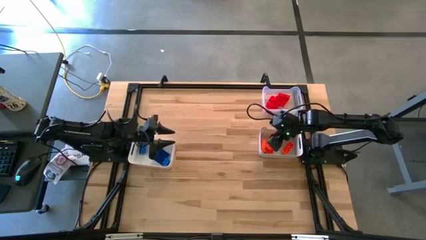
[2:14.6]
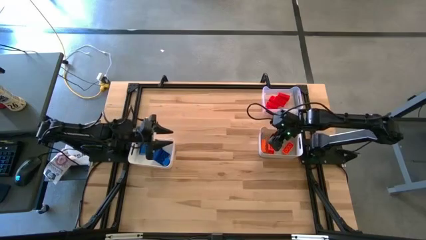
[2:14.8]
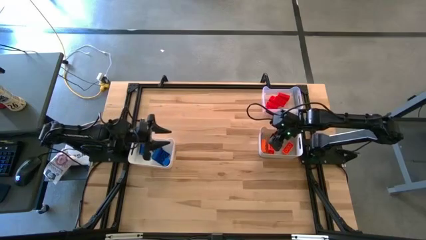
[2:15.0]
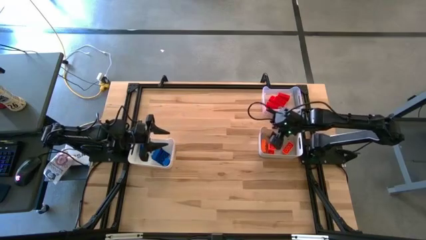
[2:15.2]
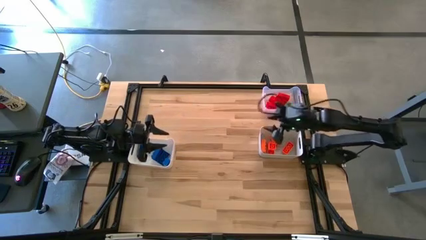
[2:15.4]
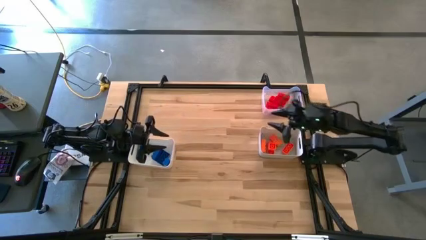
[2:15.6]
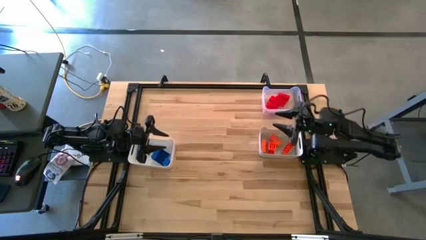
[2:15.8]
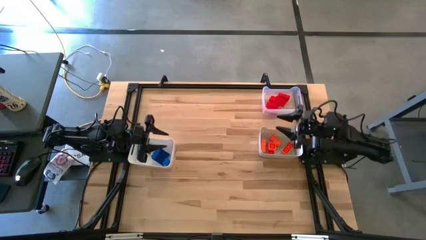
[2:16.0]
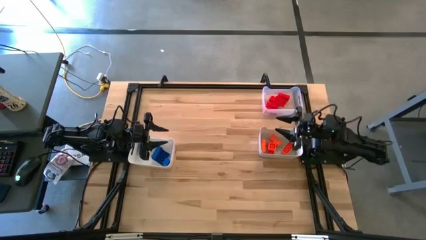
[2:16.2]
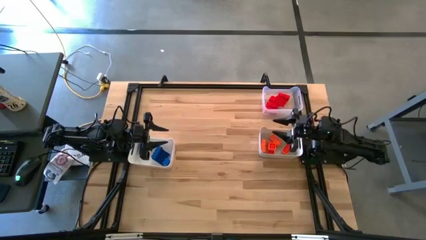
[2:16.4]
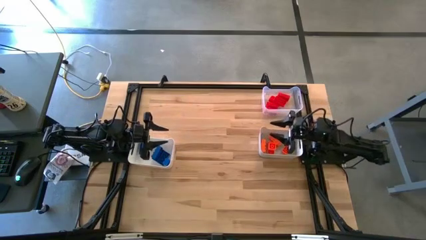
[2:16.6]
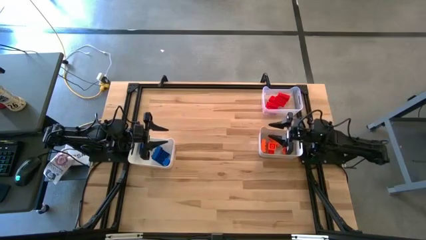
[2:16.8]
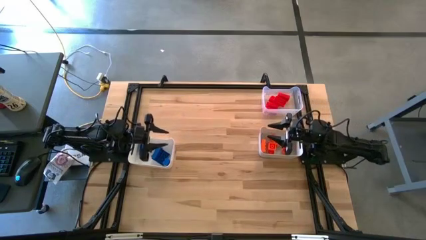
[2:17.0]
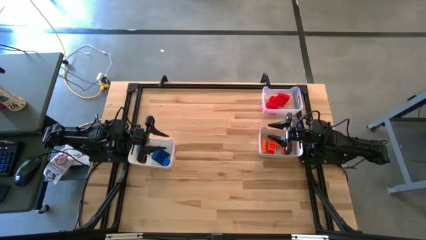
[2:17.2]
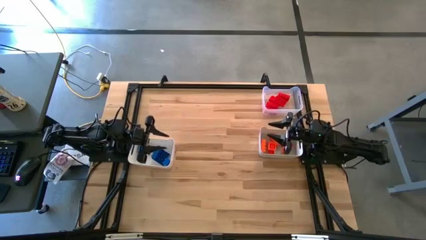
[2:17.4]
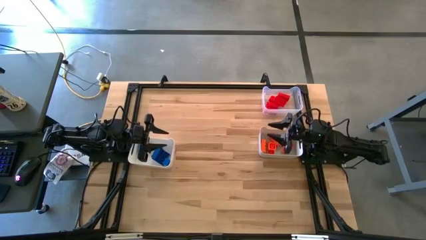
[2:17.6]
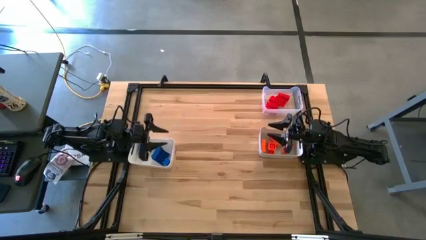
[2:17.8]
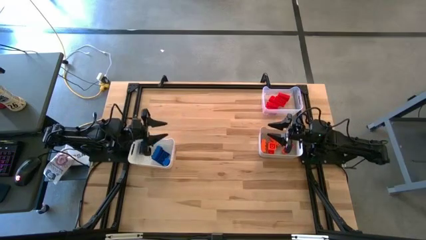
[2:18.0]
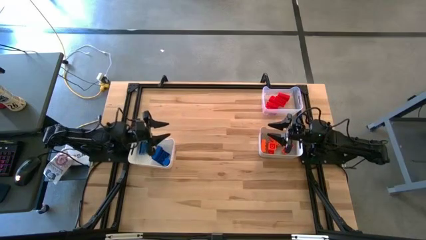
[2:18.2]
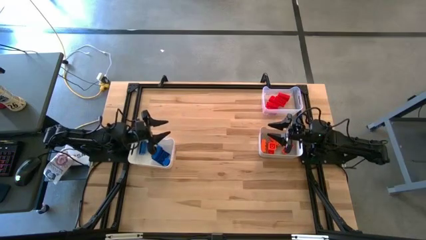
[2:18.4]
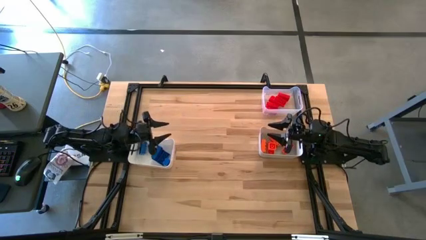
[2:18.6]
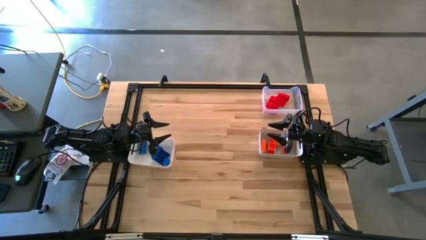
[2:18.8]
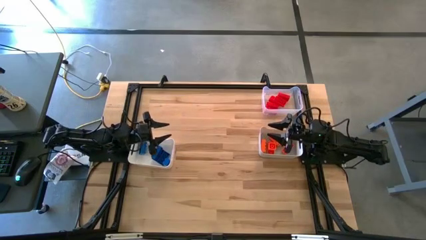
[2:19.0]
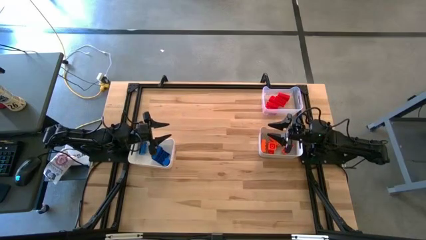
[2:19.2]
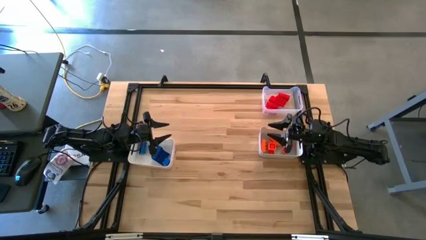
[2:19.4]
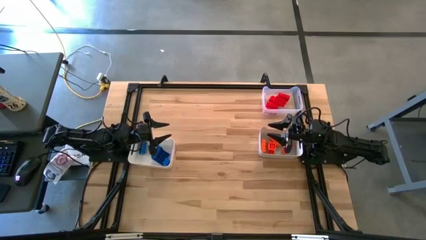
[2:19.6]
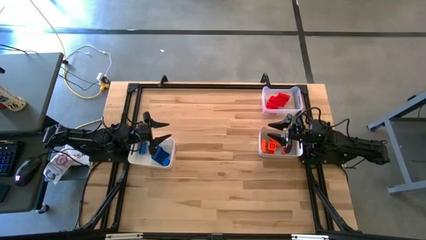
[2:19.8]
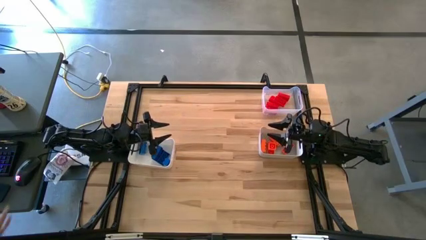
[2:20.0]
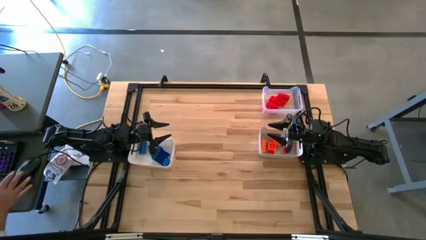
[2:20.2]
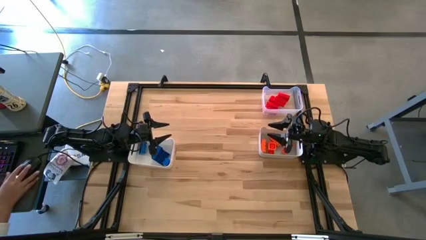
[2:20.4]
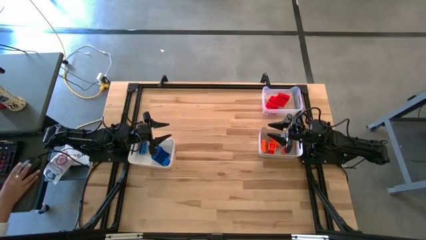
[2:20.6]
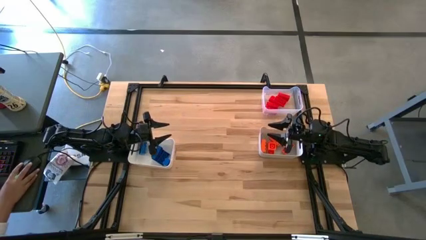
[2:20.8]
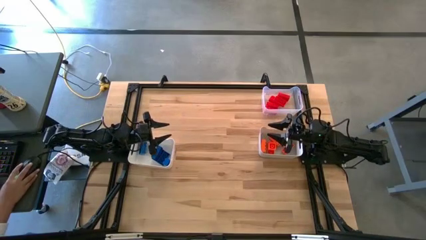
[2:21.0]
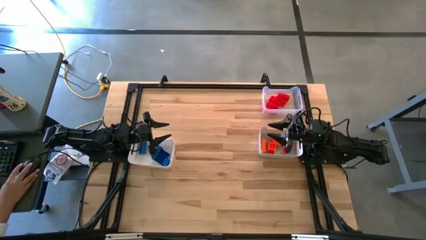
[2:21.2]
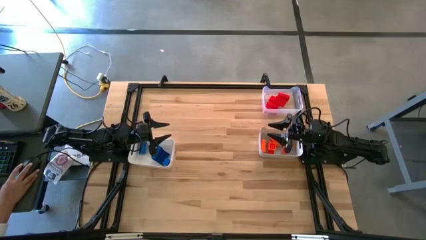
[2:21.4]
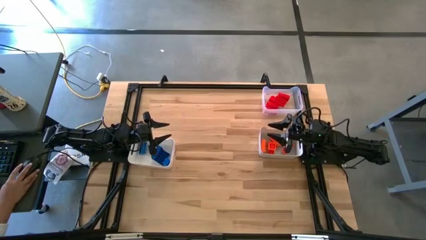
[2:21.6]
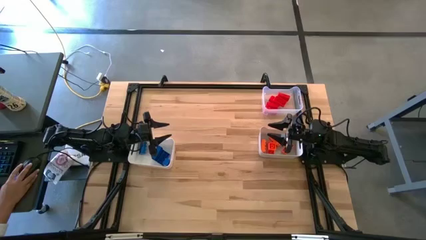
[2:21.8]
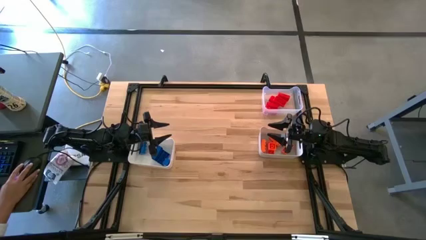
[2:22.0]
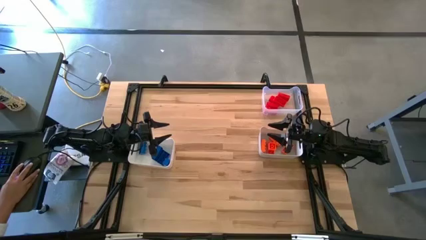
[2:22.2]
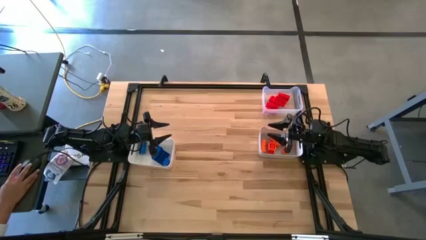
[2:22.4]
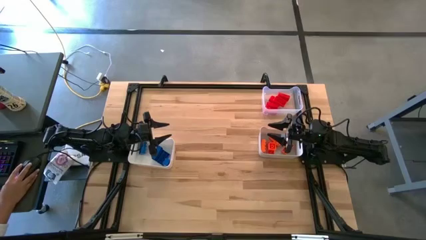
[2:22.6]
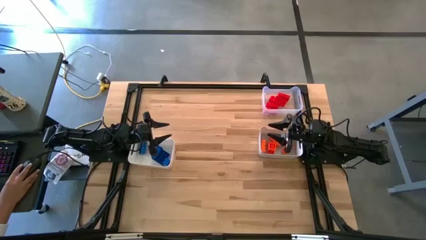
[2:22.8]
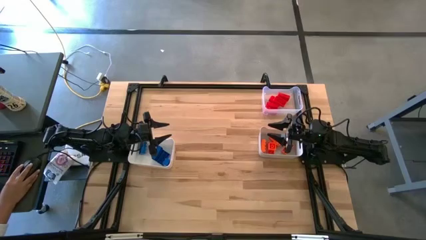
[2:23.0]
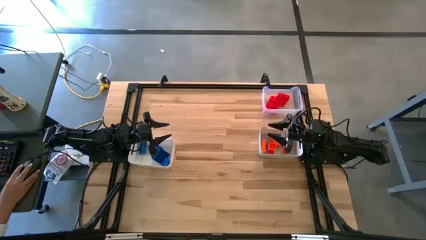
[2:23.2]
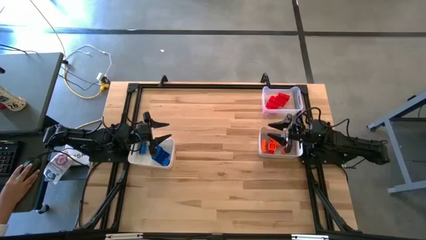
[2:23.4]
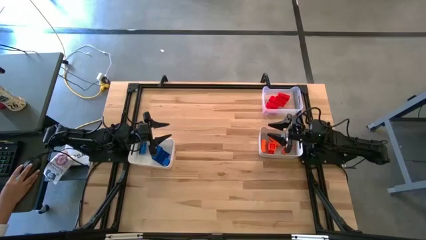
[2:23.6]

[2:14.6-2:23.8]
Task: Sort & place blocks by color
Return to Home Position

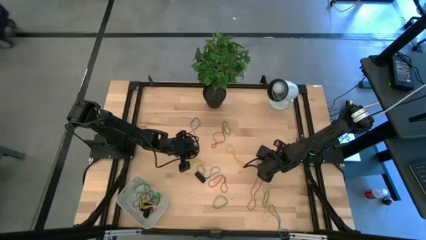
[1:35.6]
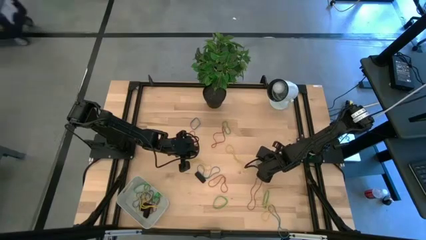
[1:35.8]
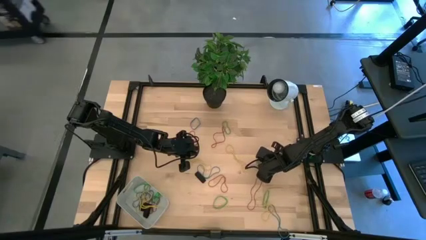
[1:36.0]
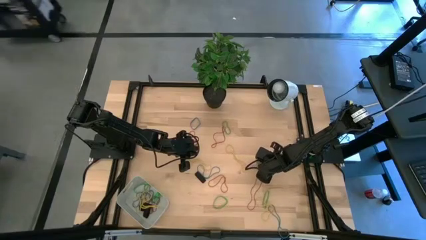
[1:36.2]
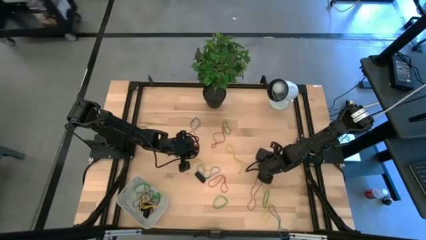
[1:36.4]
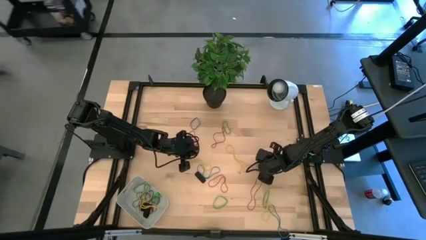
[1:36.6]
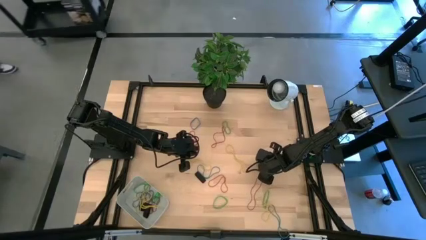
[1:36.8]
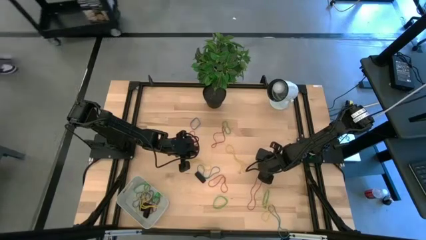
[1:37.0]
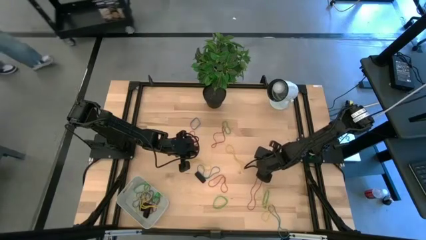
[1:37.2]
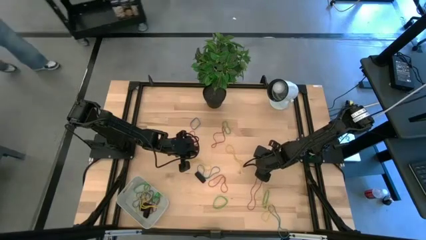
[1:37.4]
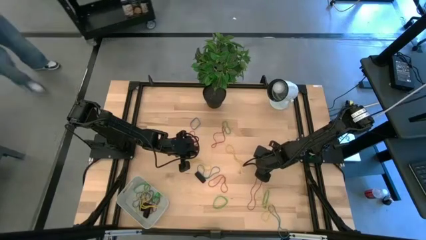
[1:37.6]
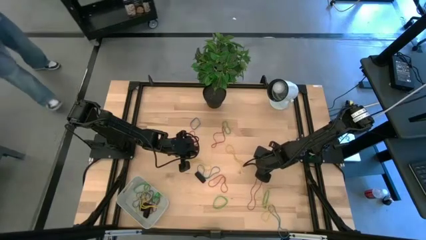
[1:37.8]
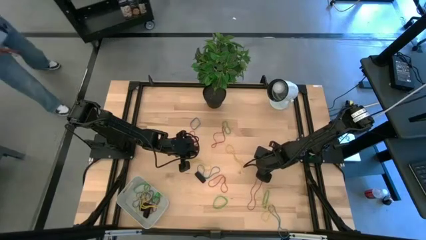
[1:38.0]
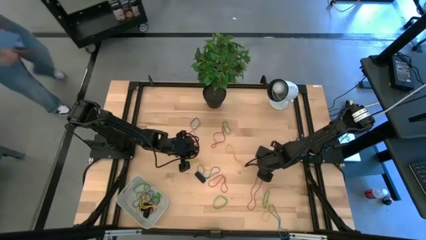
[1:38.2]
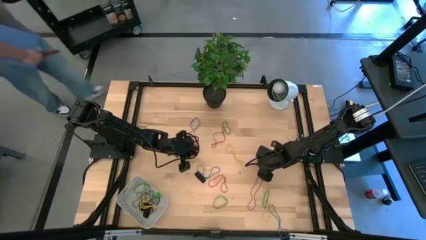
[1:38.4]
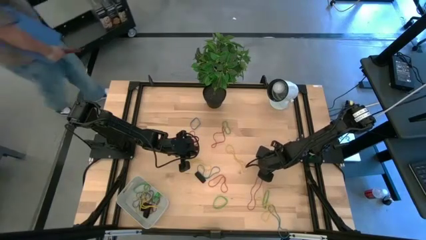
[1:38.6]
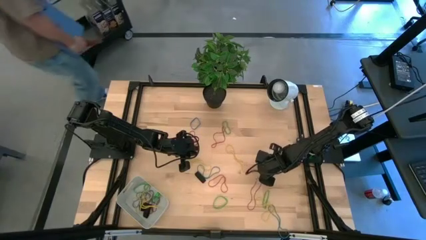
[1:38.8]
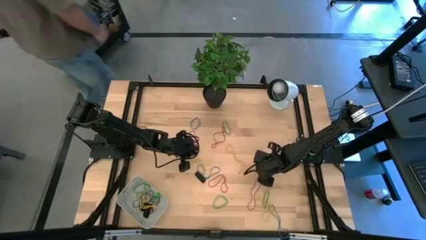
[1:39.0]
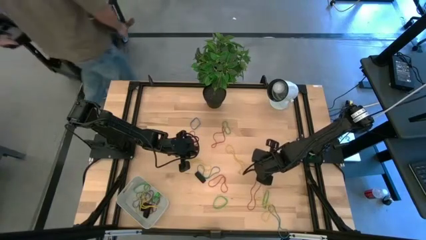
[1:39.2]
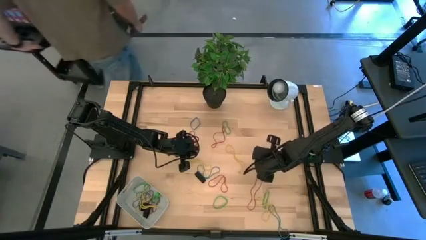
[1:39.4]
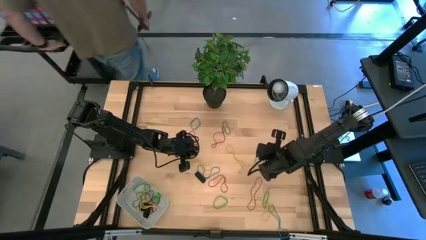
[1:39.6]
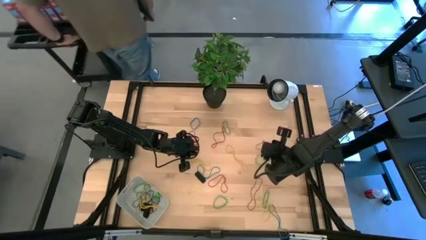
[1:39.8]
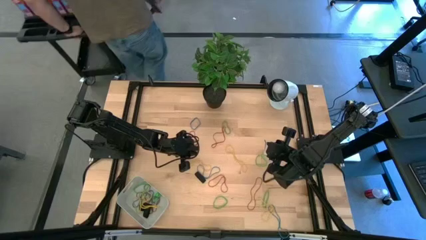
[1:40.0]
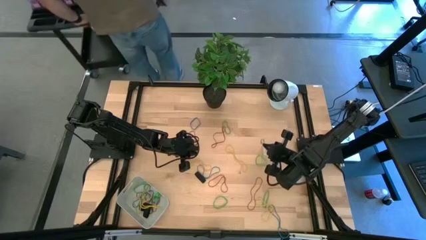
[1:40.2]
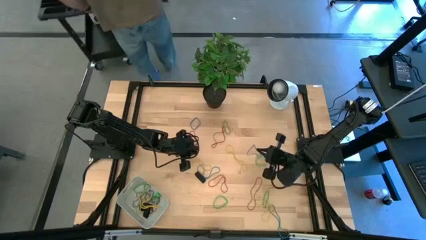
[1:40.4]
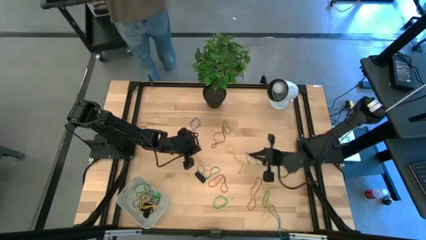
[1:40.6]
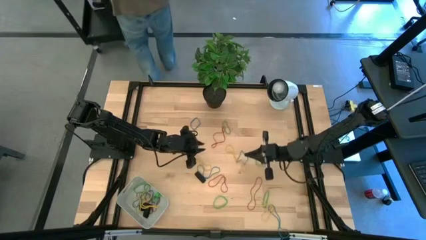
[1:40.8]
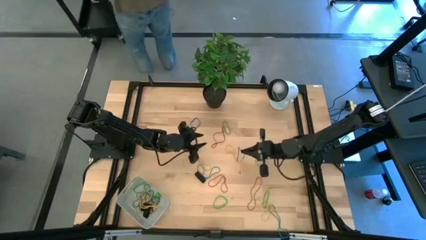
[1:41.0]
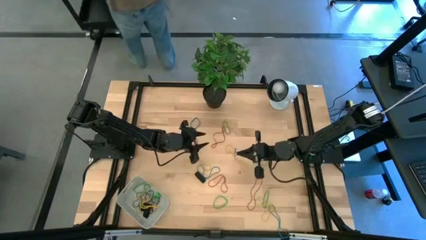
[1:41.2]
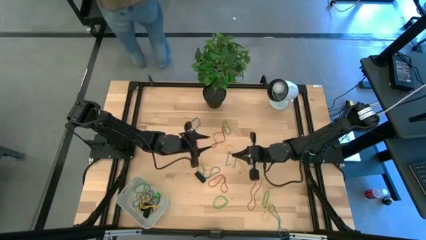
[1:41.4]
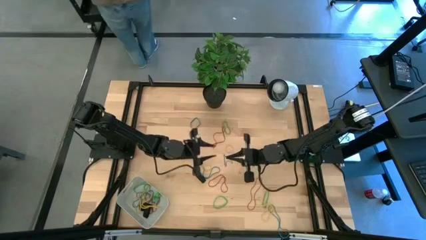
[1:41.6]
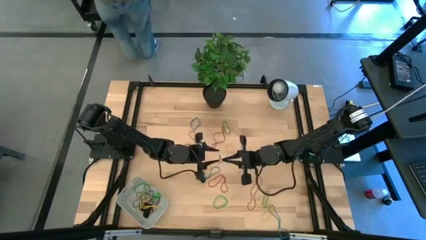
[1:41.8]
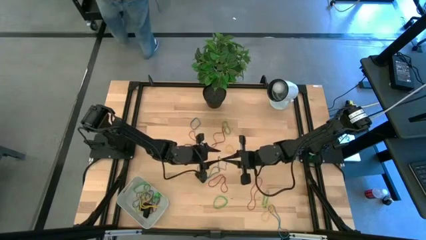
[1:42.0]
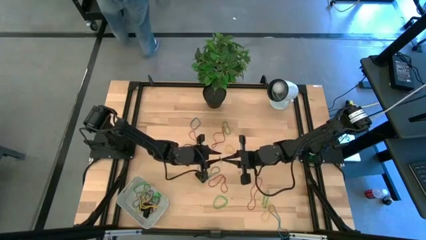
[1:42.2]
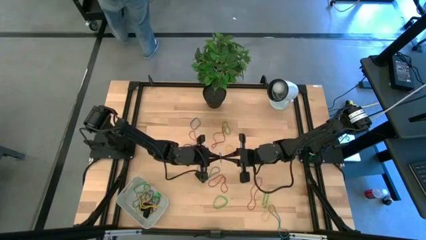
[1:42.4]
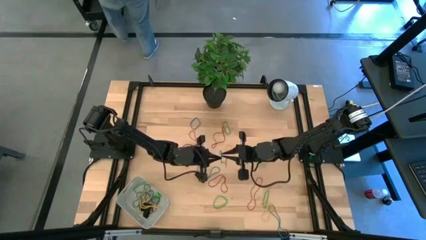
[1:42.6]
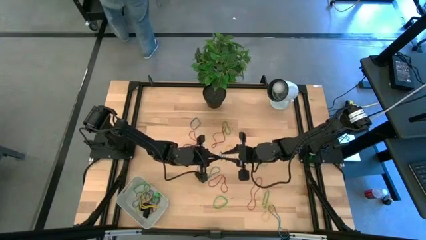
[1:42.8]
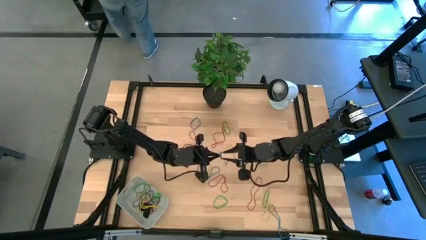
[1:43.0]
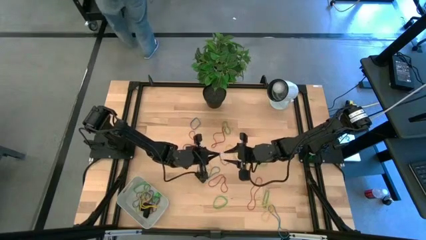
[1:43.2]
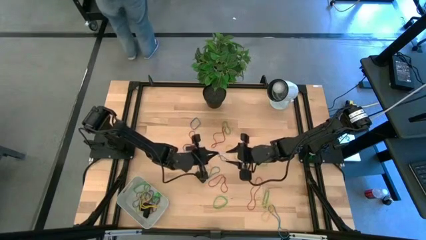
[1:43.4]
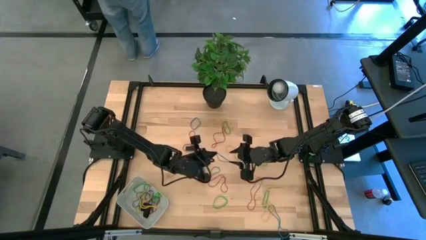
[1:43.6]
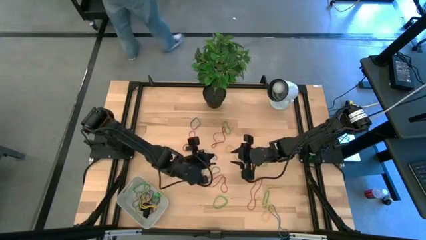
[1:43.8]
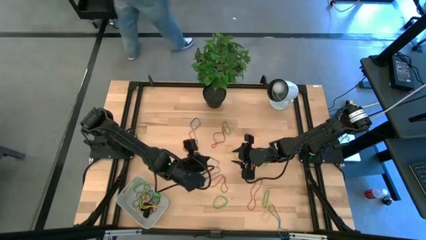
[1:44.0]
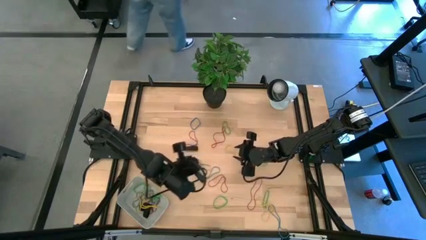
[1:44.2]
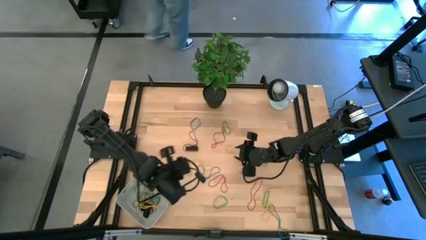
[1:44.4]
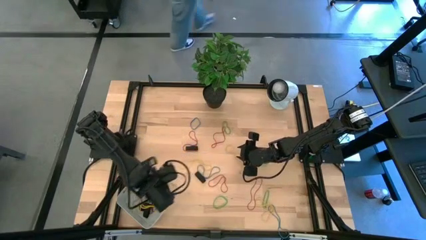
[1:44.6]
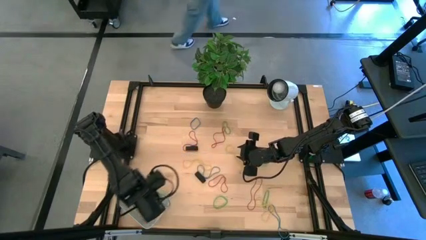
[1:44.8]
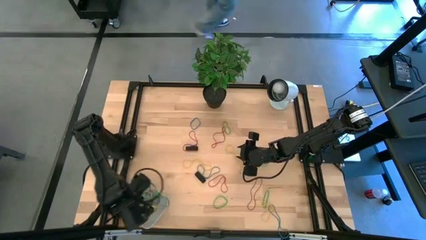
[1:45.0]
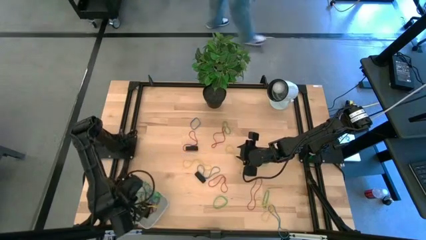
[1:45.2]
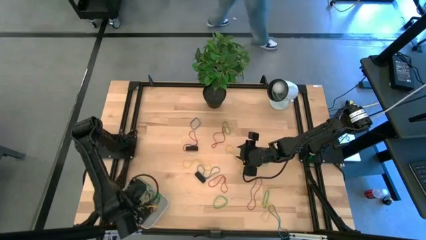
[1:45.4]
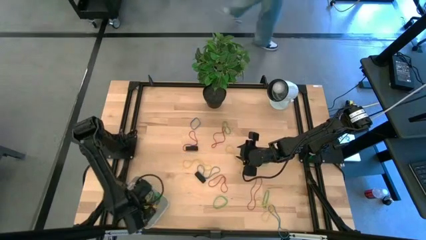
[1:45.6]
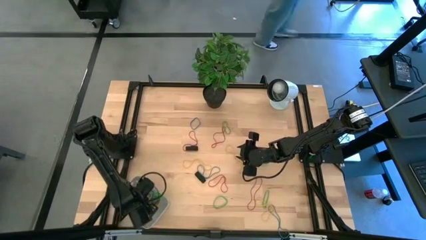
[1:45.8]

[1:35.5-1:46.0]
Task: Pick and place rubber bands into bin
Put the blue rubber band into the gray bin
